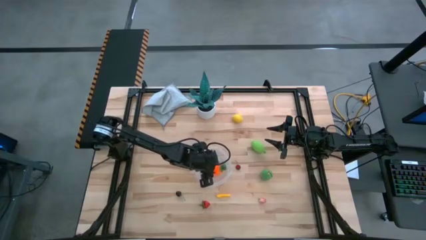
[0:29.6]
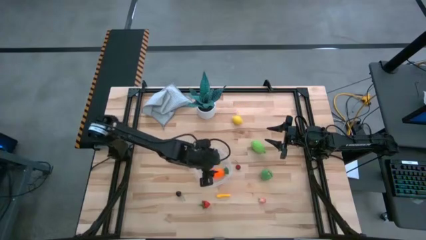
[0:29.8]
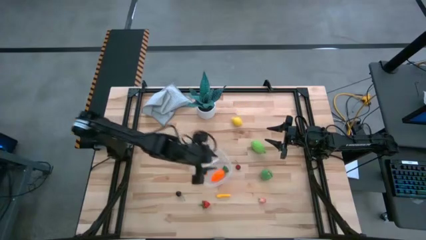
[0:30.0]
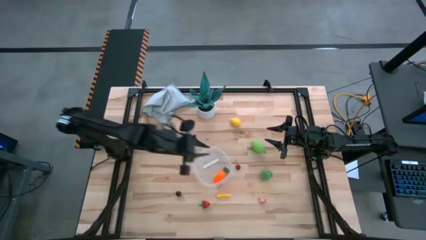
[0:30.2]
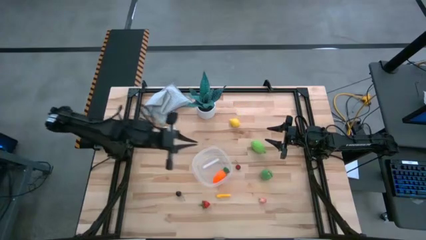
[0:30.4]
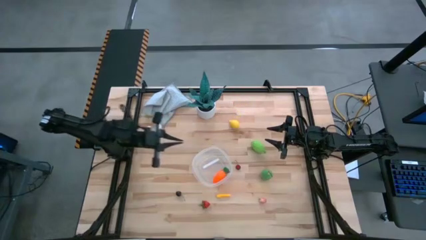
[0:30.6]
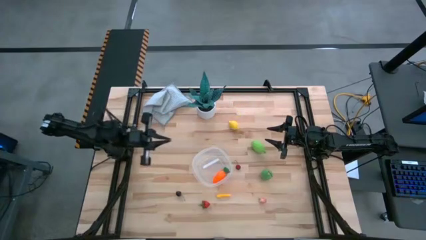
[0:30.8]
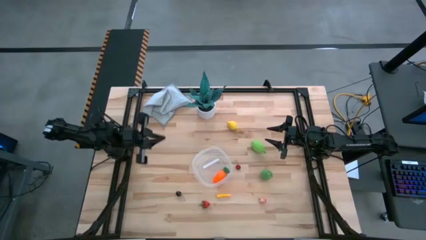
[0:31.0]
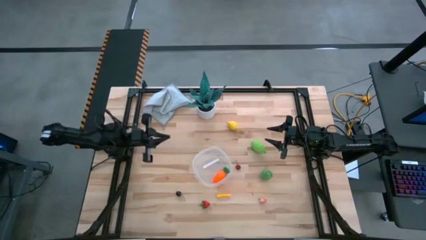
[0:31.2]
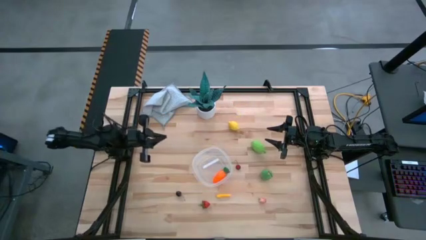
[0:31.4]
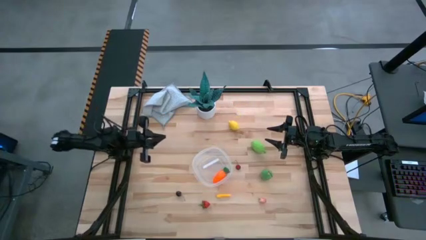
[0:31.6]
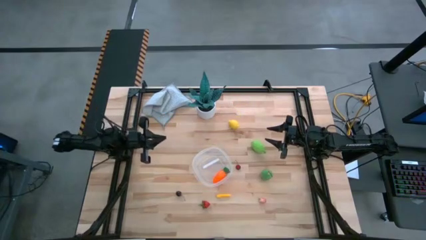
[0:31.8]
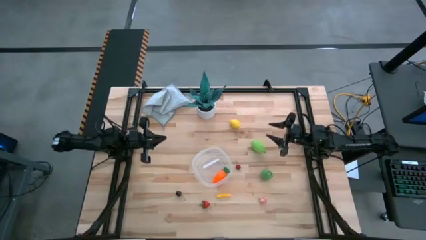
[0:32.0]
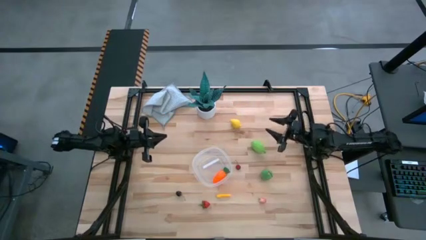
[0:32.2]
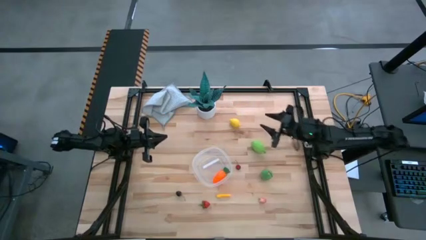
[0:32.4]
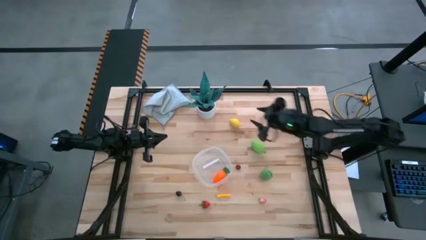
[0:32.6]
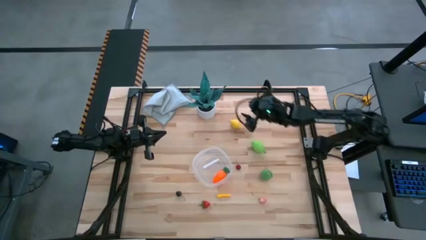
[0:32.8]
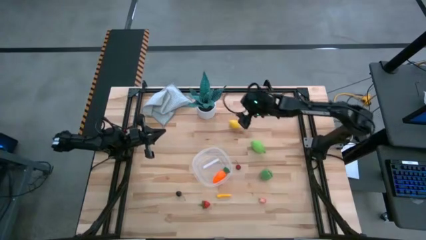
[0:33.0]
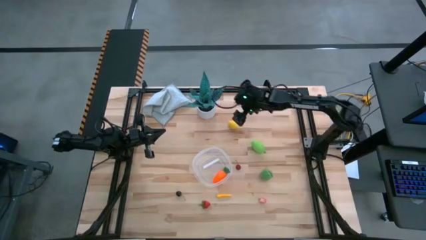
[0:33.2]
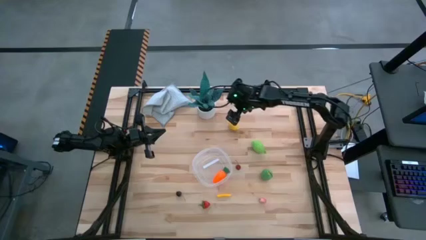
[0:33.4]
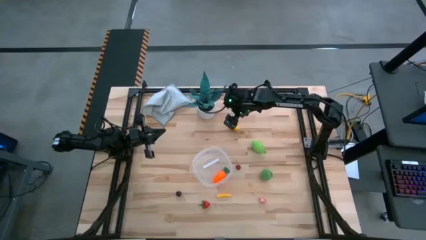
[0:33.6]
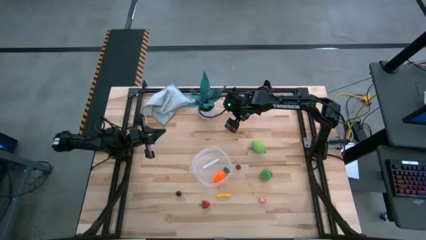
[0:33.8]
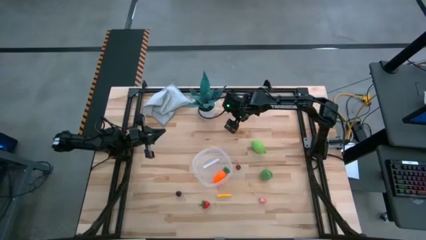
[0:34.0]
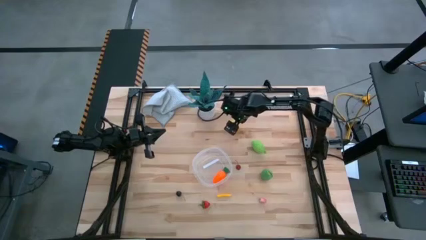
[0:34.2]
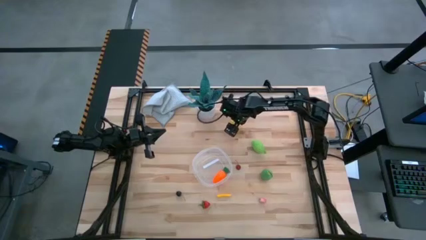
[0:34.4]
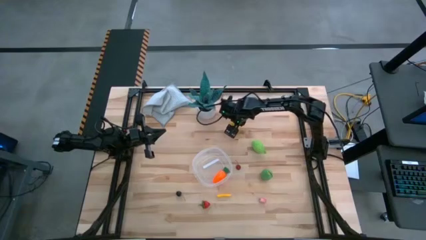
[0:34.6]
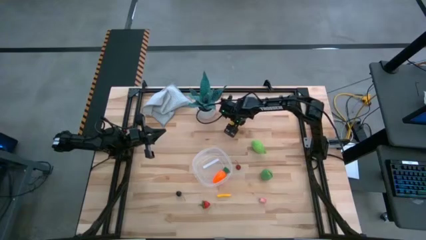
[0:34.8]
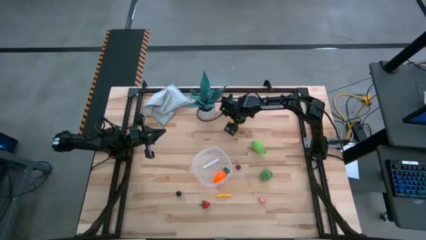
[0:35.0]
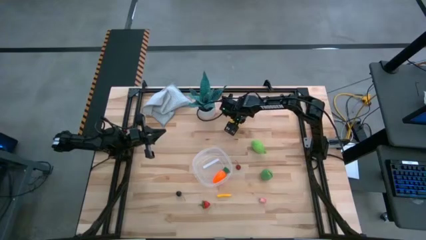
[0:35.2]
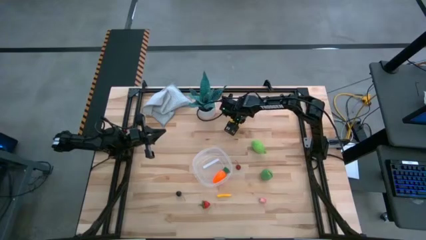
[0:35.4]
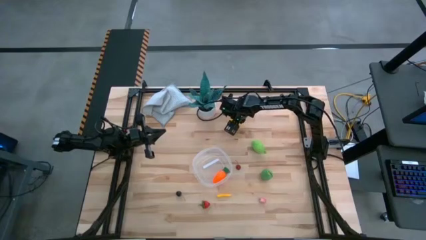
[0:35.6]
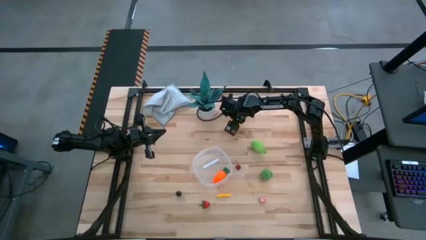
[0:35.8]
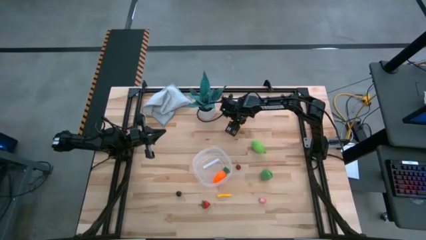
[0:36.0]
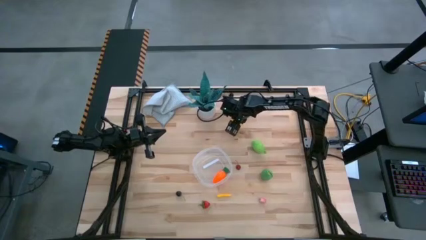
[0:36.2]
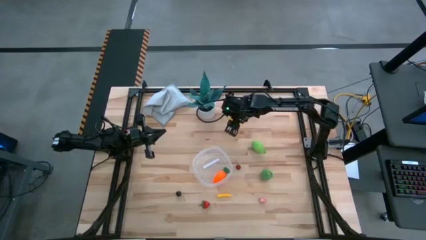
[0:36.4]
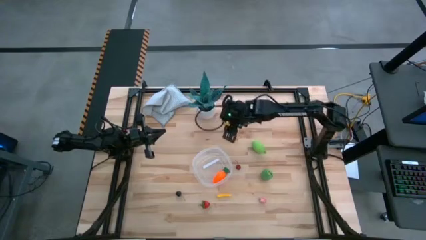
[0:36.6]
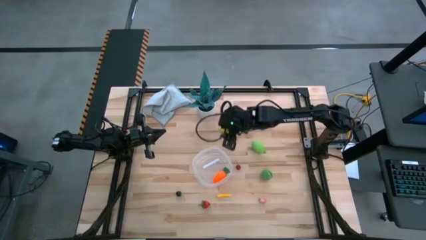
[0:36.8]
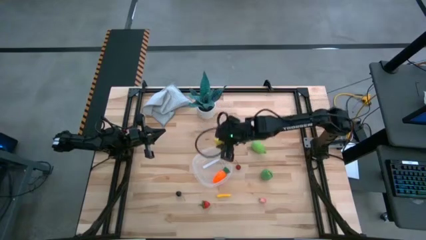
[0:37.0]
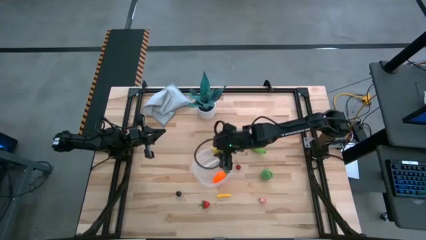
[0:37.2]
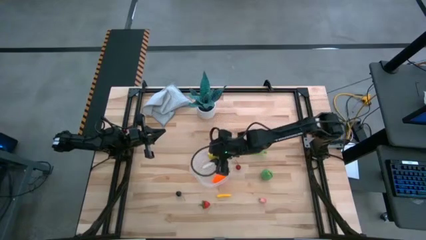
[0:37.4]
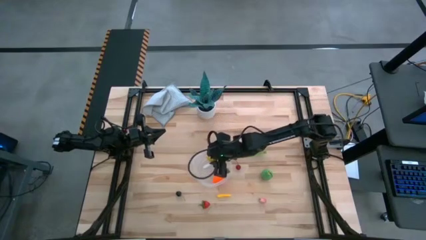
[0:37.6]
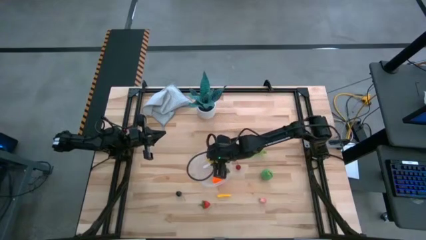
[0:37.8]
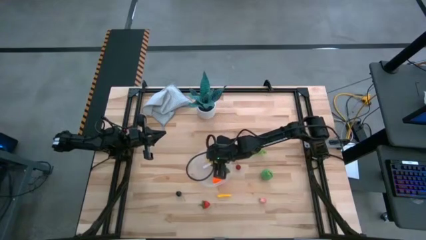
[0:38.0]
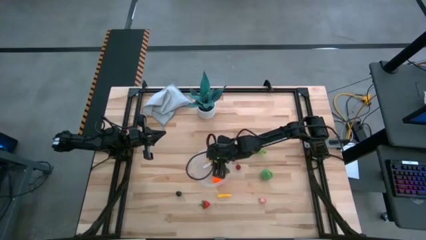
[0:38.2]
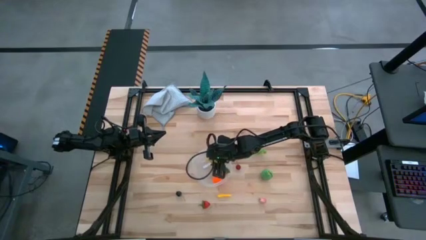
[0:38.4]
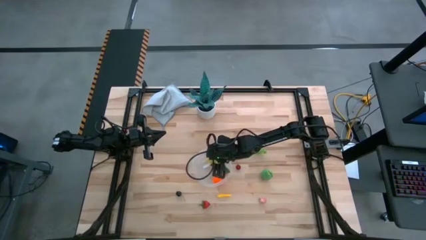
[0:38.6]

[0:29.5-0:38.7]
Task: Pick and placing Produce into tupperware
Put the lemon into the bin

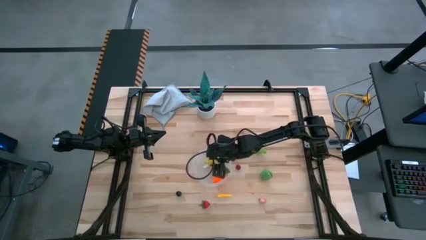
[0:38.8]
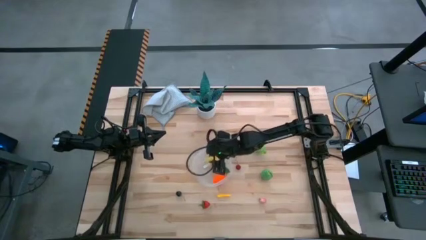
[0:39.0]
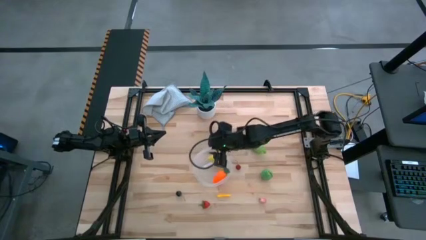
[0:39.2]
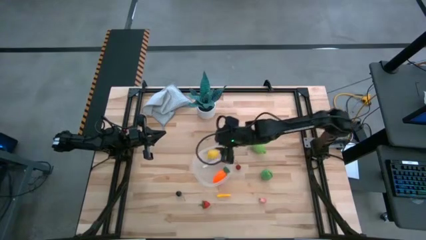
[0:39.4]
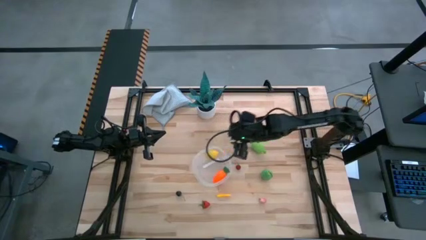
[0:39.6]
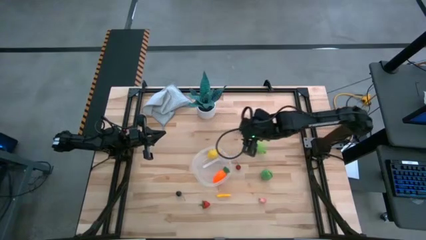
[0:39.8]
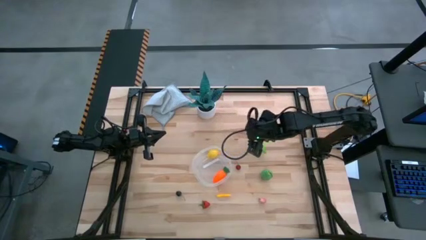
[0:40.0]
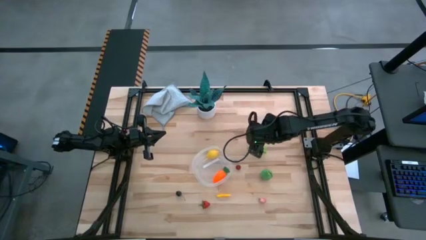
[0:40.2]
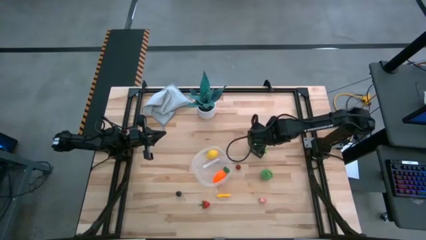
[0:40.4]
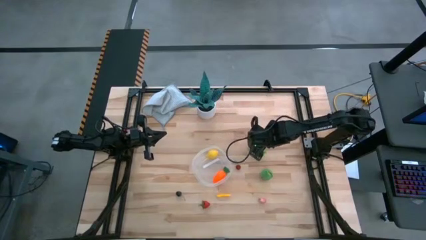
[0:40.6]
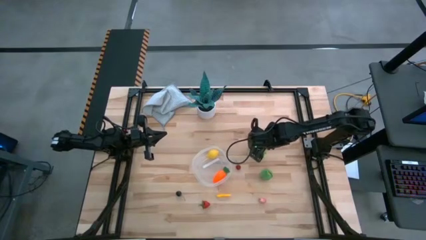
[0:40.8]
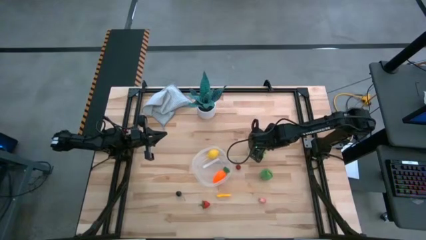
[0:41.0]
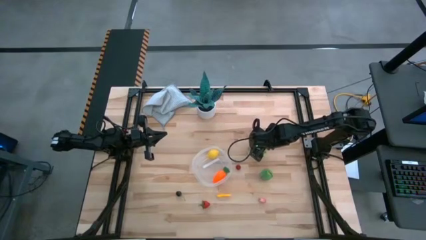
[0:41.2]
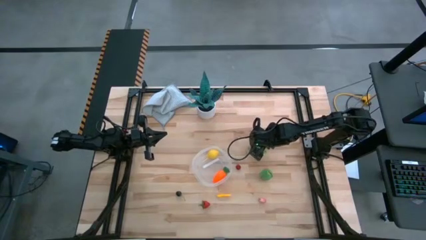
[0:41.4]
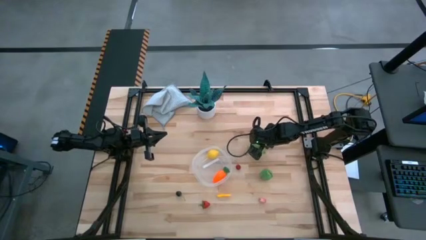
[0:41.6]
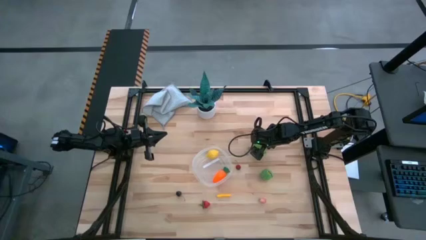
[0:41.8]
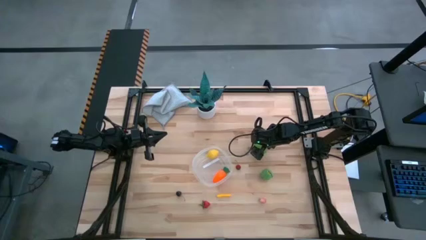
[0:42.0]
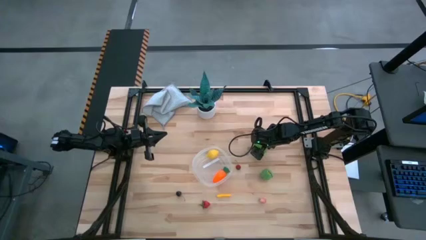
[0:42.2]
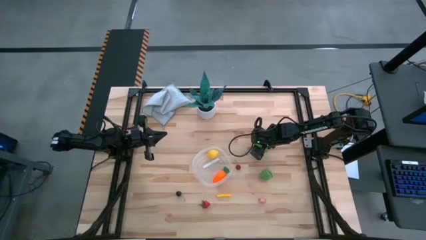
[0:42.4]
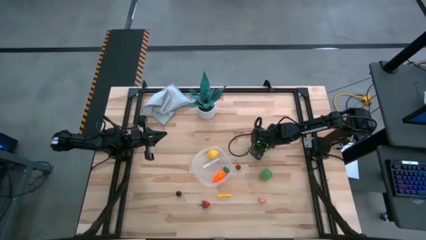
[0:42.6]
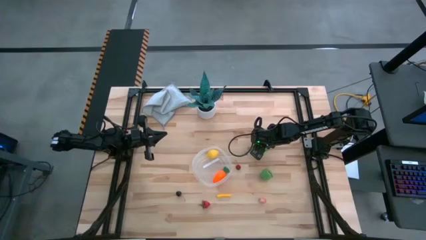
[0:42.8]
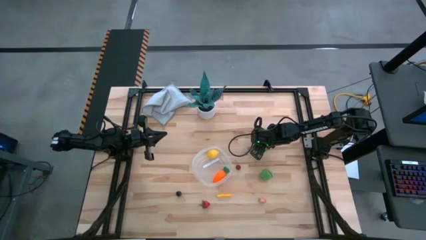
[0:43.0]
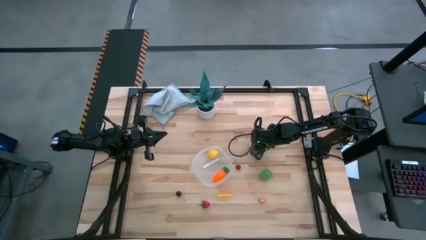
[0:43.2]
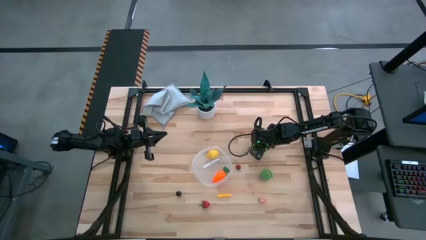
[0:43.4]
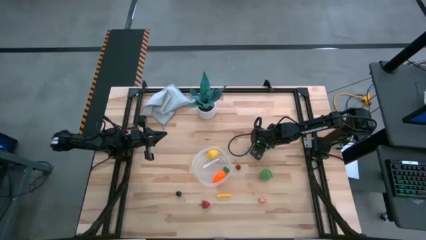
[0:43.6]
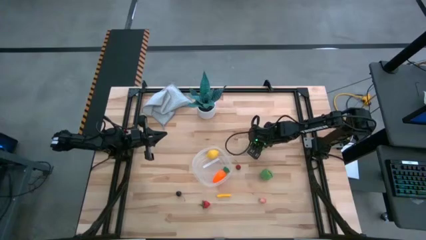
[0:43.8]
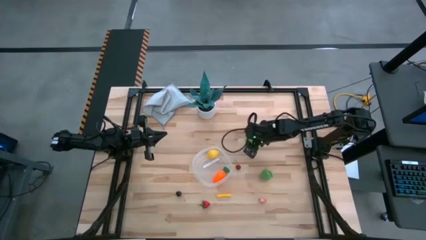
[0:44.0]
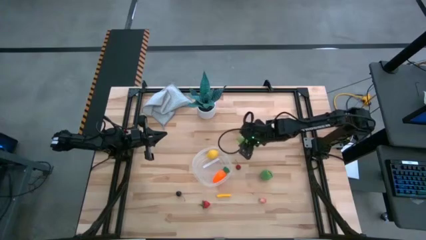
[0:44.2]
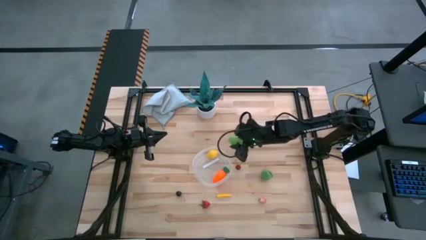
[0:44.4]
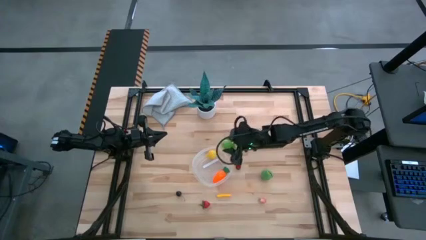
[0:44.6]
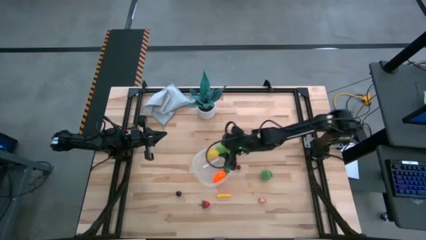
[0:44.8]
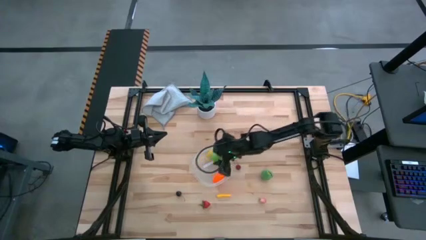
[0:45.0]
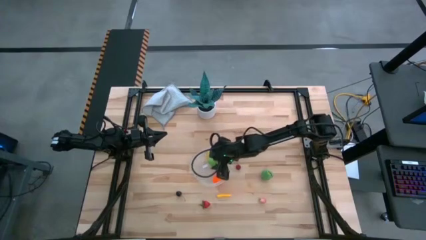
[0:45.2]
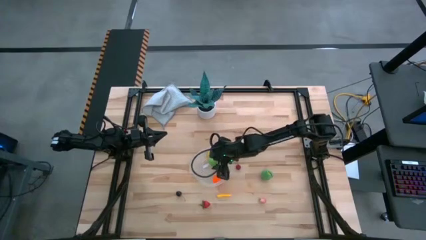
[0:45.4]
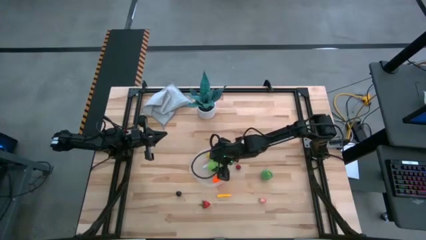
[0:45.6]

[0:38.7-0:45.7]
Put the honeydew into the bin
